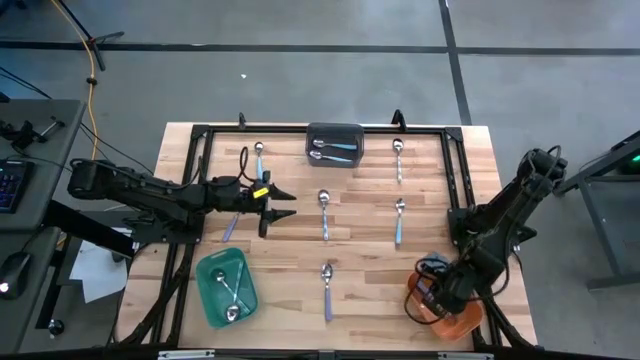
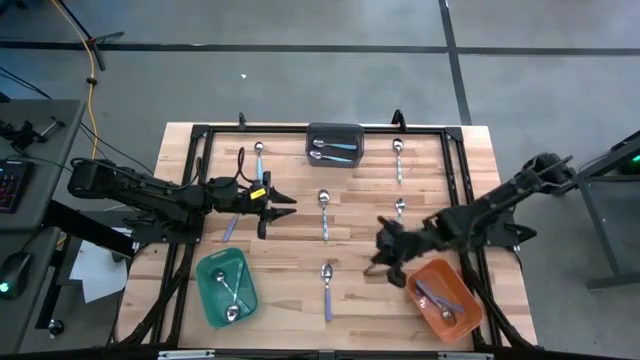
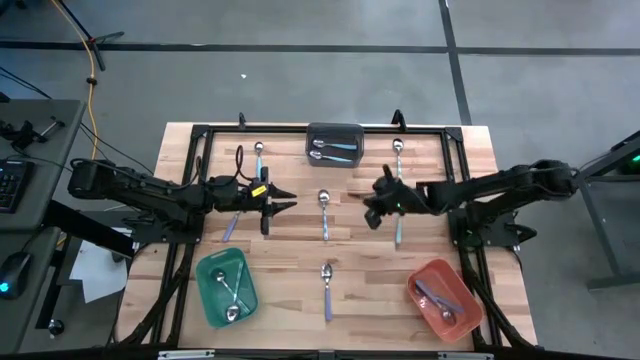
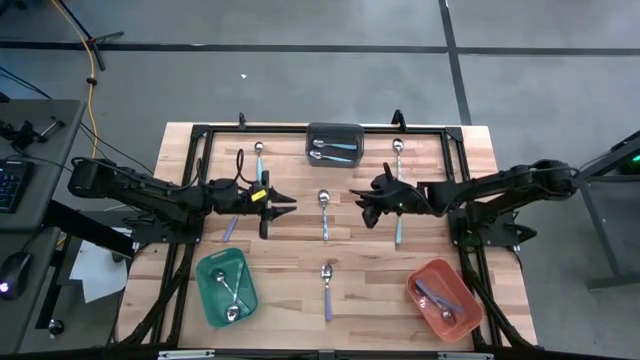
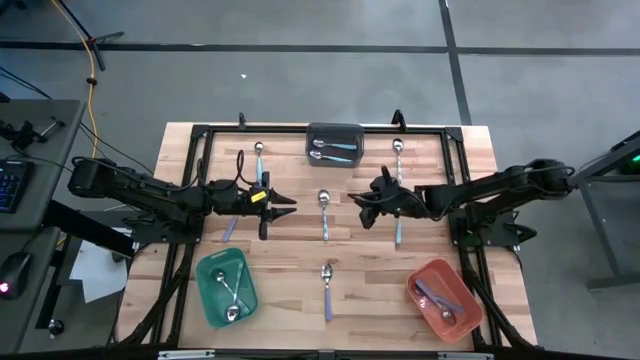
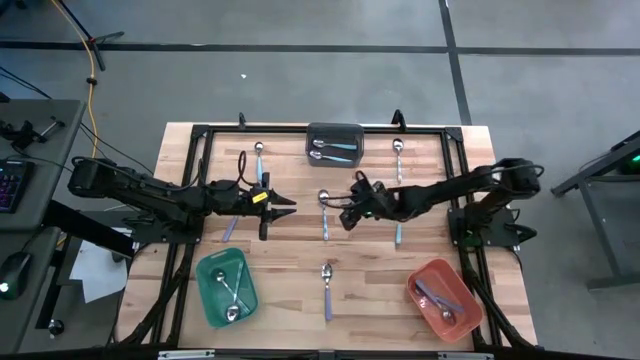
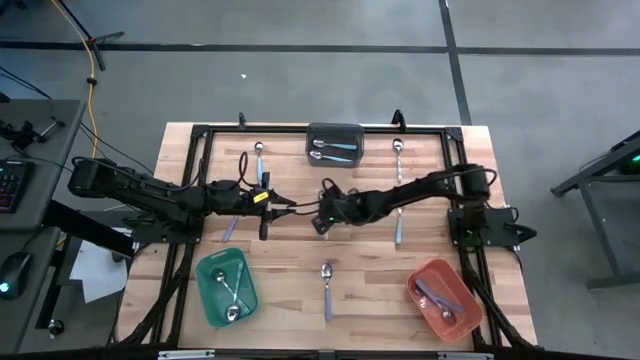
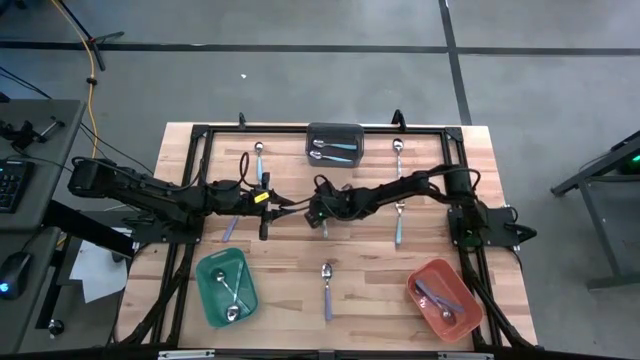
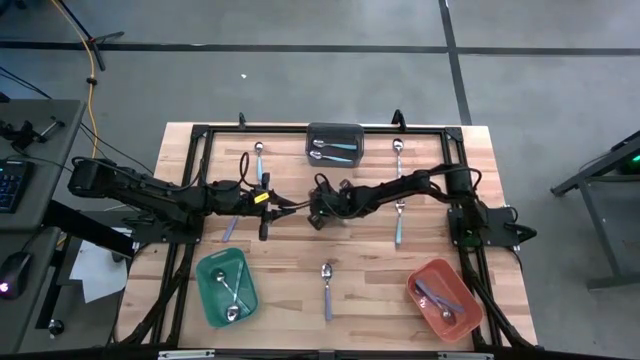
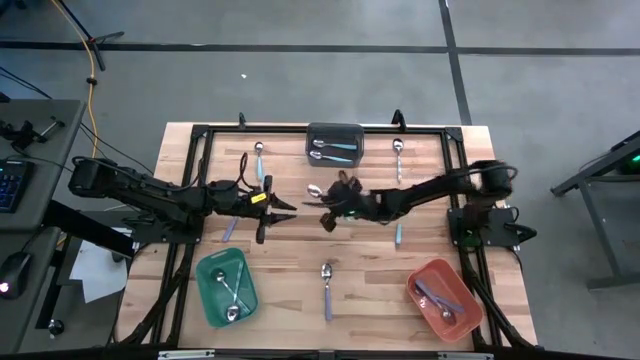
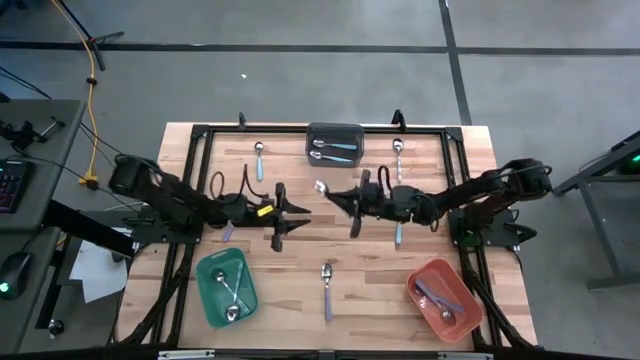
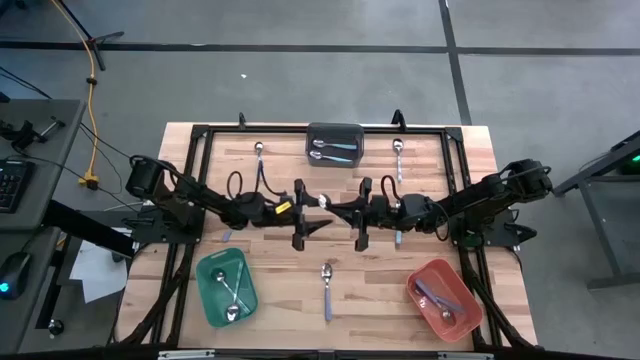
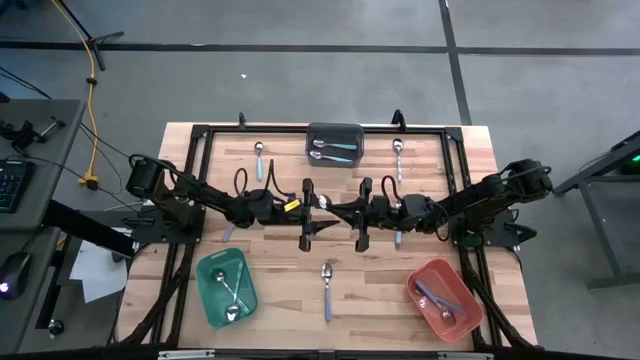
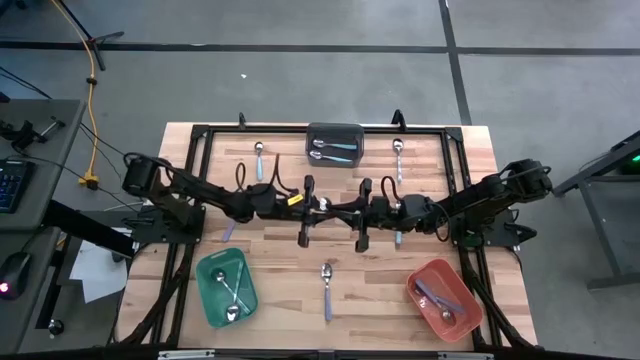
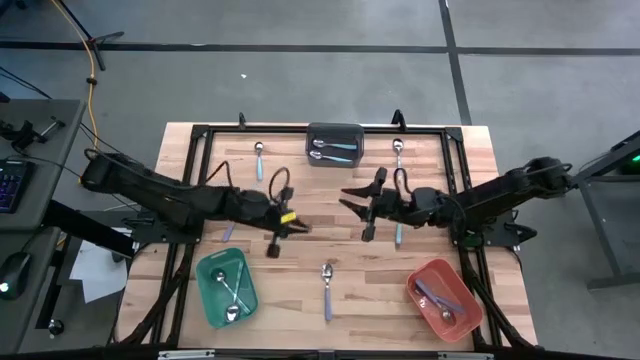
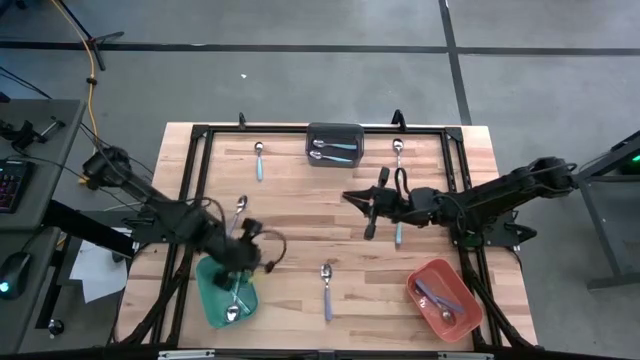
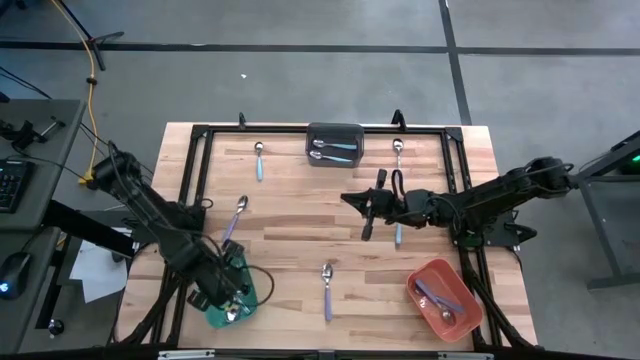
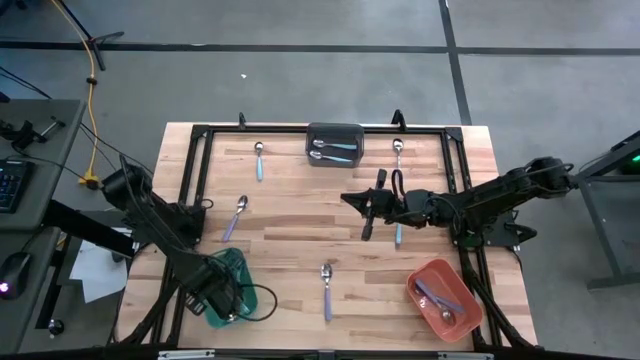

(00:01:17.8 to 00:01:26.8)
Task: Sort silverware by color (type)
Put the white patterned into the green bin

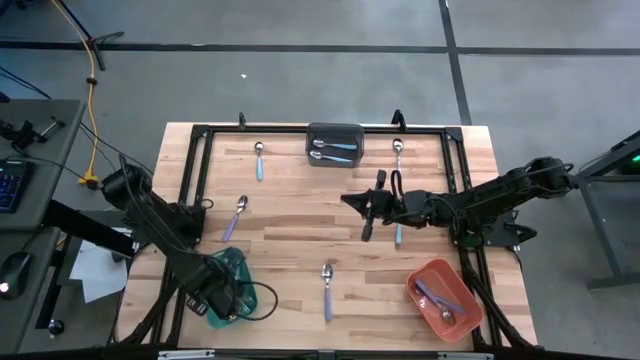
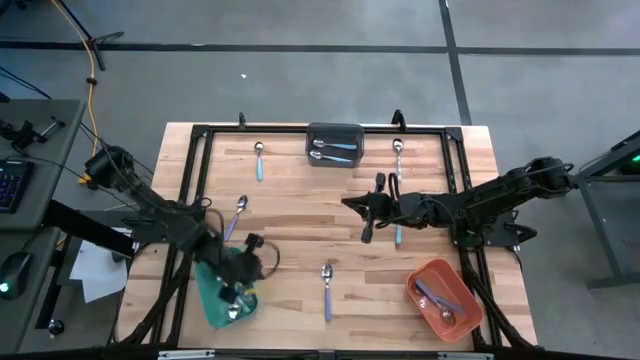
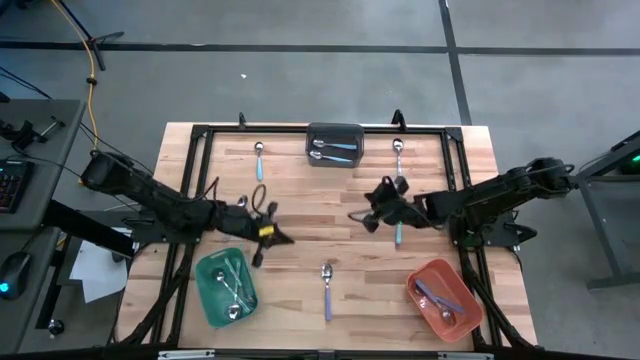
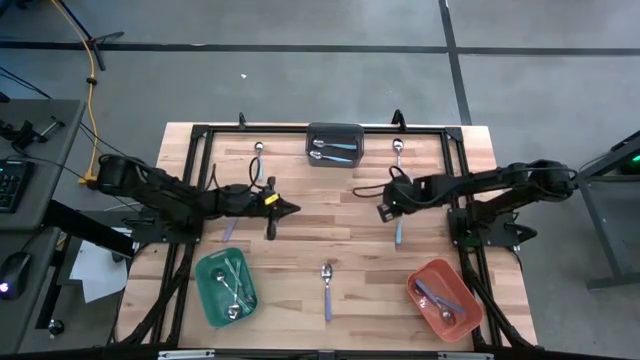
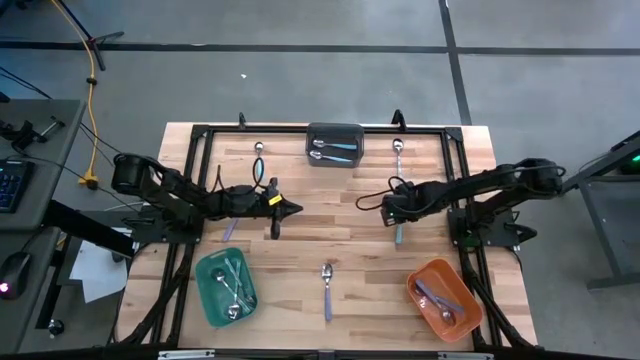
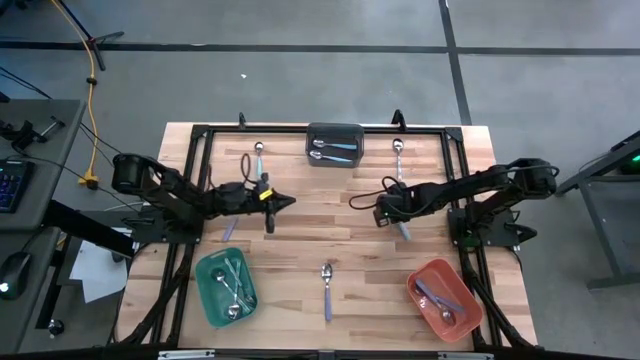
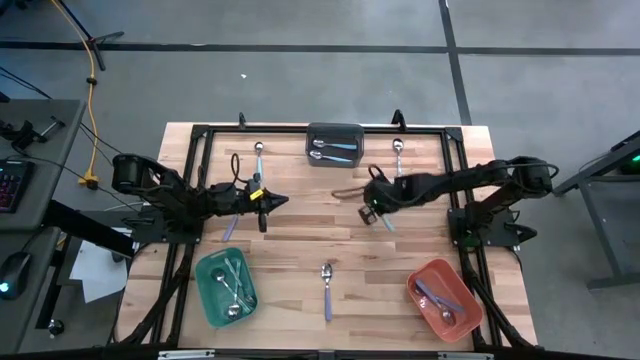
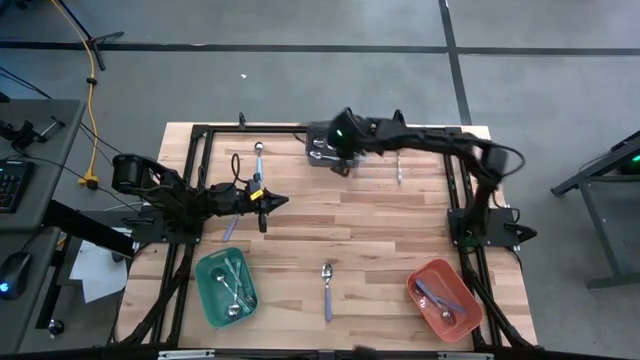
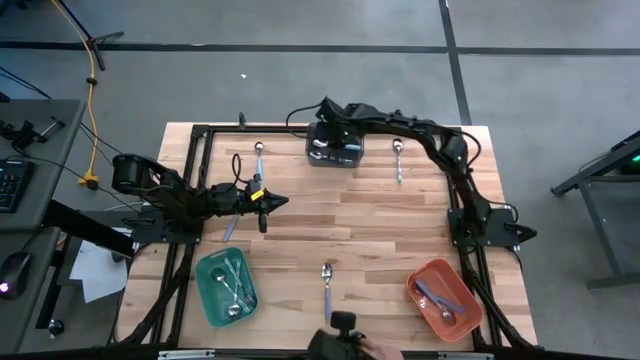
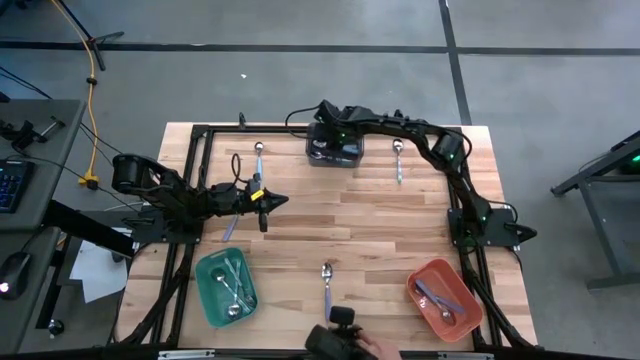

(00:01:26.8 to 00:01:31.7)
Put the blue spoon into the black bin

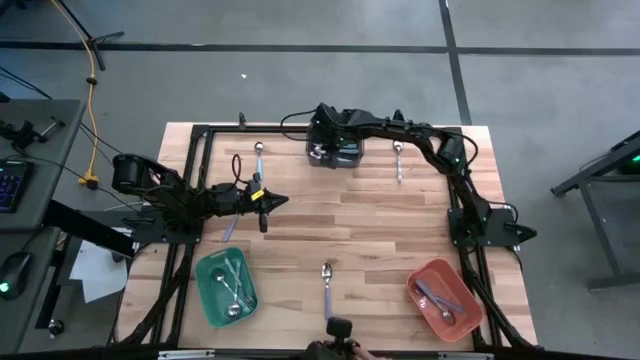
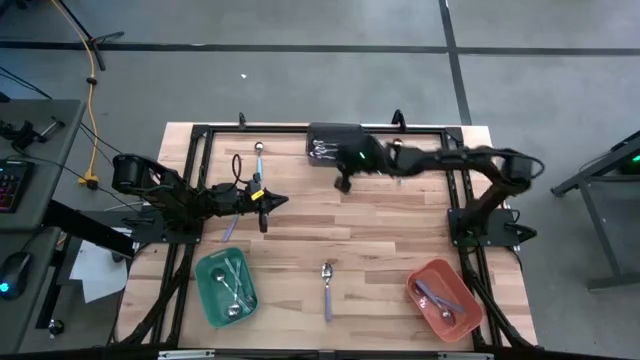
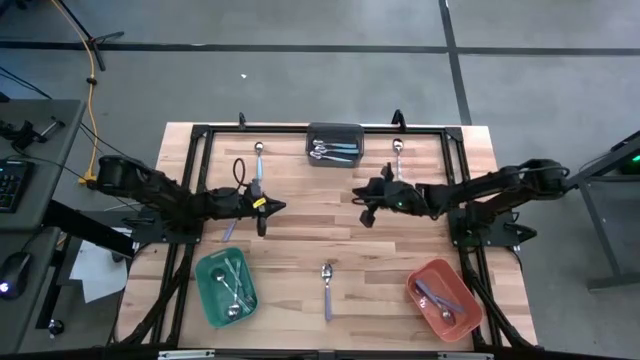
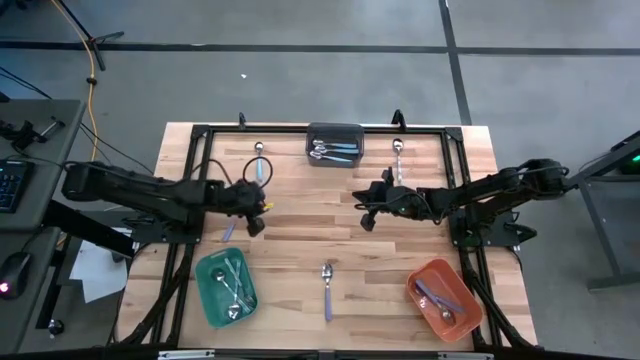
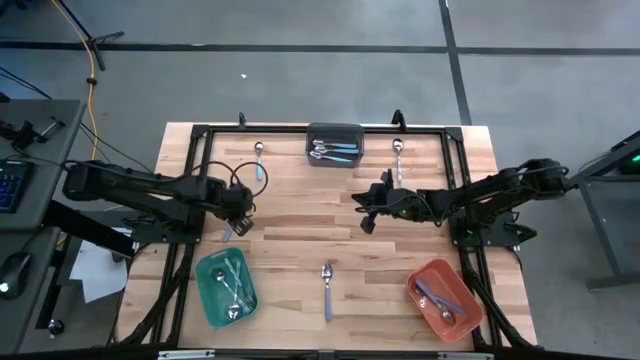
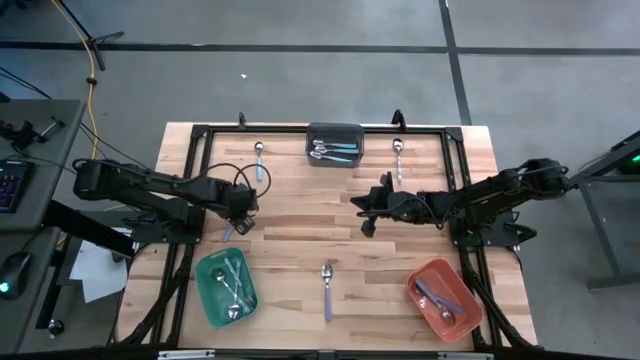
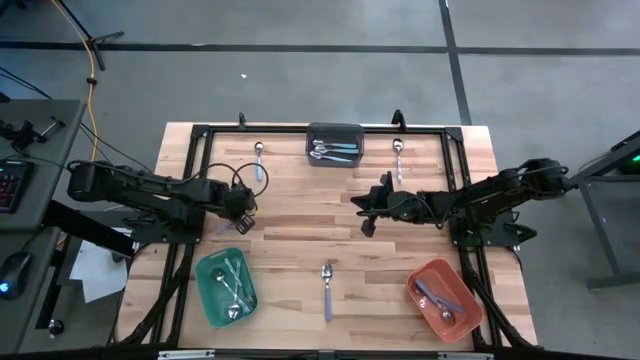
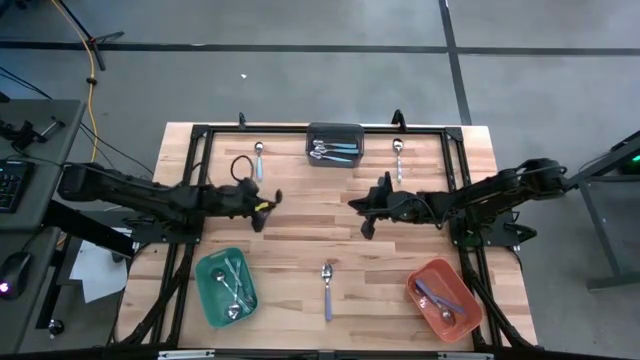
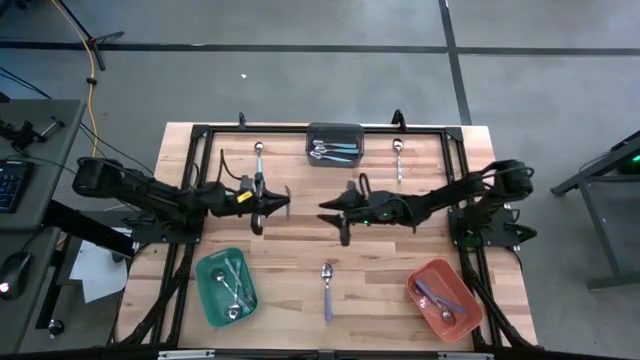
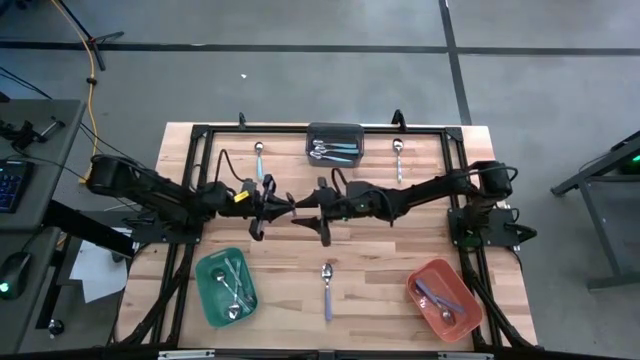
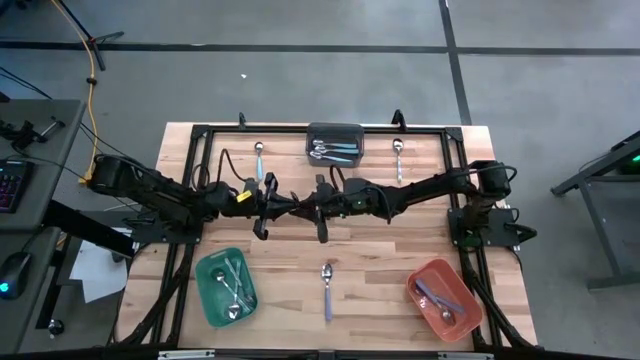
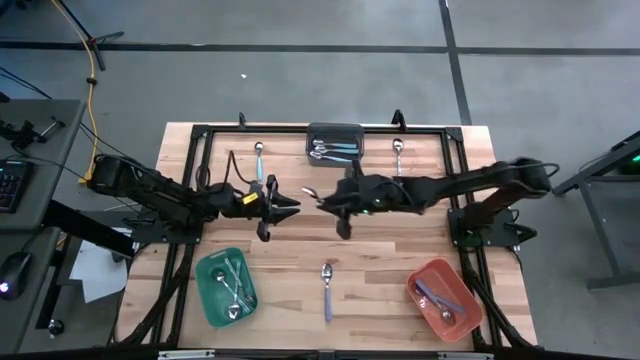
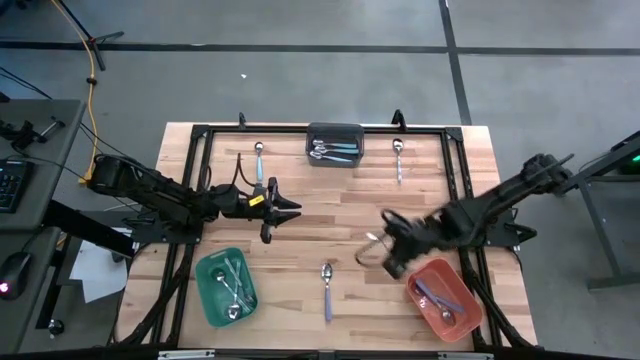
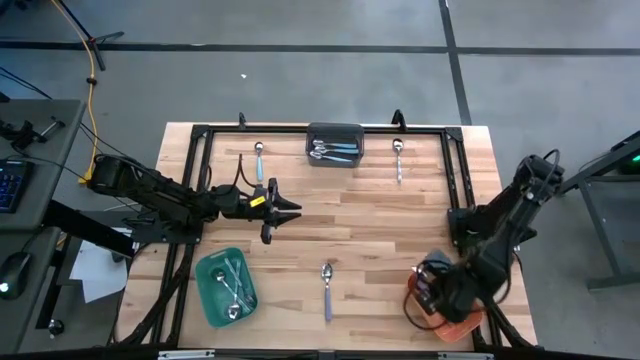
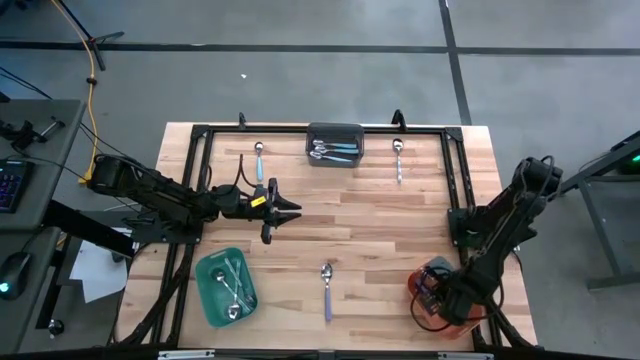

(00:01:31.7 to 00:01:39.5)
Put the purple spoon into the orange bin
